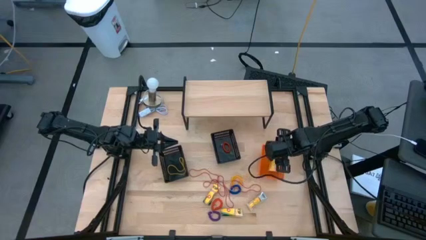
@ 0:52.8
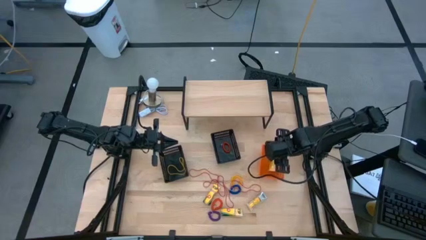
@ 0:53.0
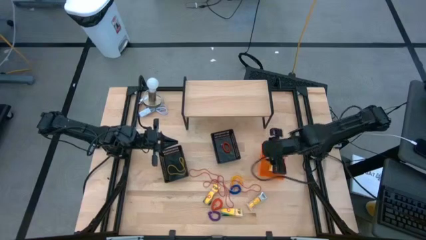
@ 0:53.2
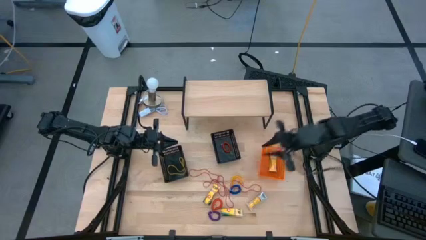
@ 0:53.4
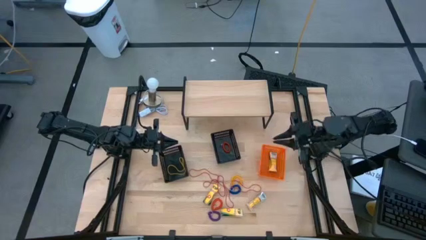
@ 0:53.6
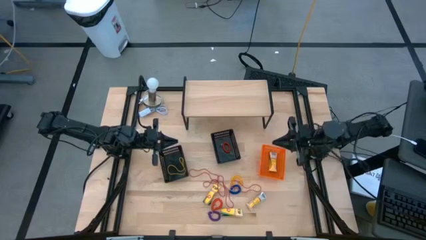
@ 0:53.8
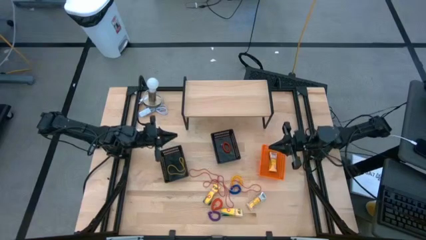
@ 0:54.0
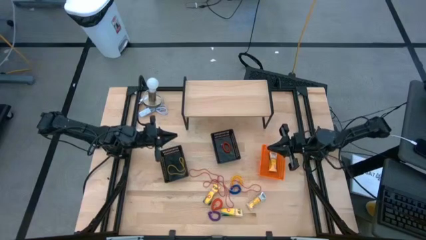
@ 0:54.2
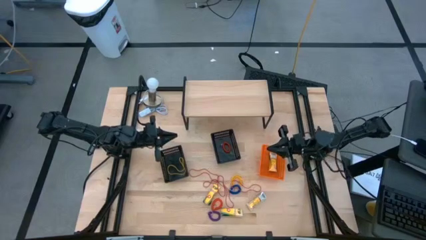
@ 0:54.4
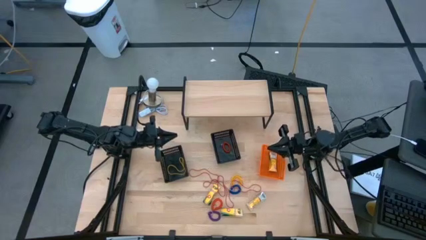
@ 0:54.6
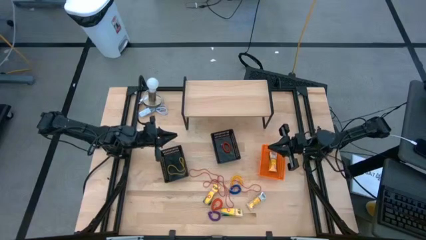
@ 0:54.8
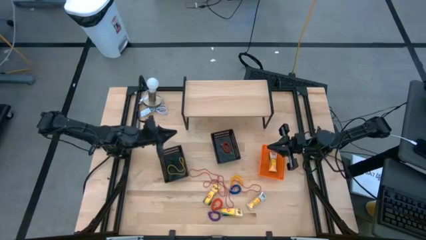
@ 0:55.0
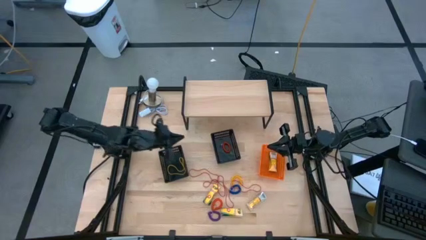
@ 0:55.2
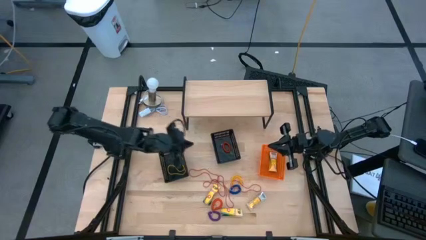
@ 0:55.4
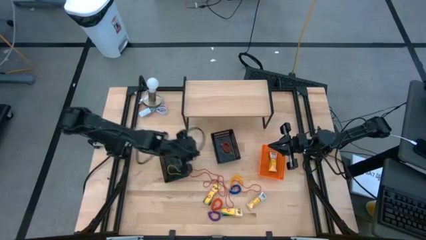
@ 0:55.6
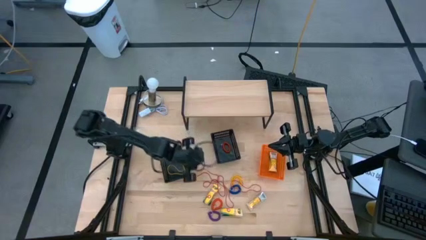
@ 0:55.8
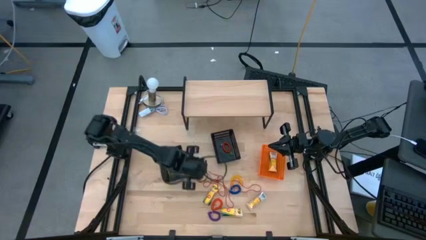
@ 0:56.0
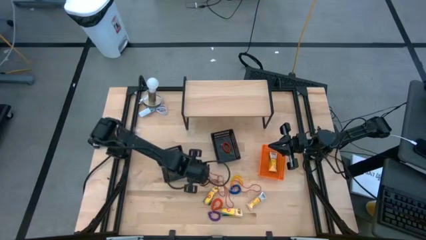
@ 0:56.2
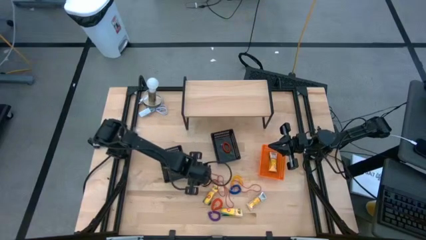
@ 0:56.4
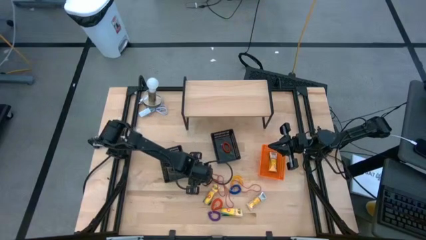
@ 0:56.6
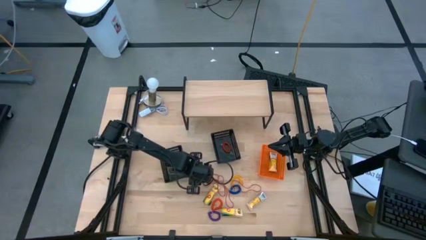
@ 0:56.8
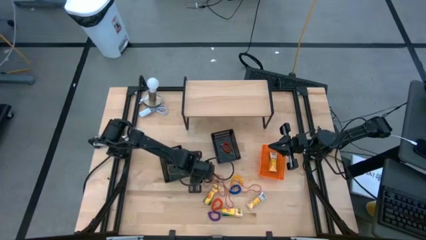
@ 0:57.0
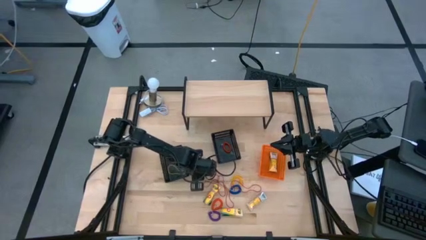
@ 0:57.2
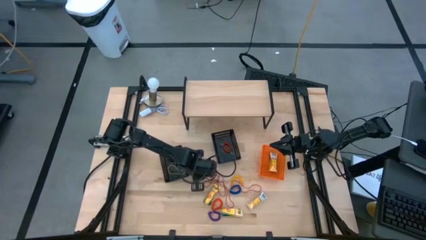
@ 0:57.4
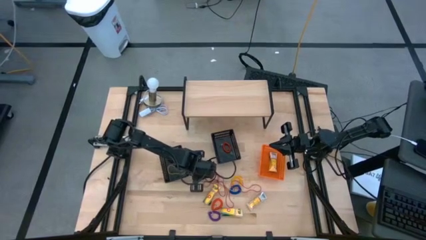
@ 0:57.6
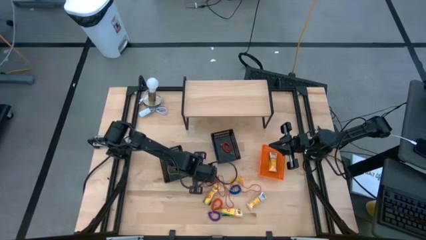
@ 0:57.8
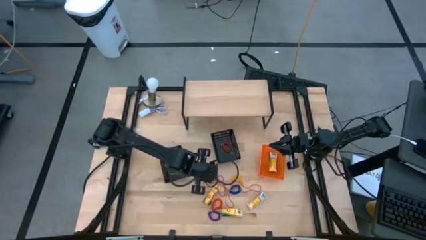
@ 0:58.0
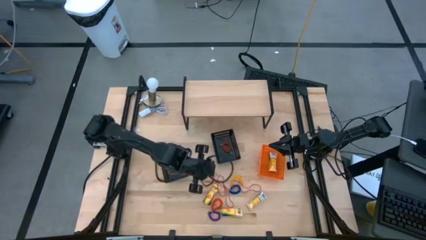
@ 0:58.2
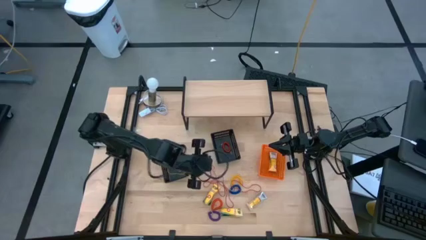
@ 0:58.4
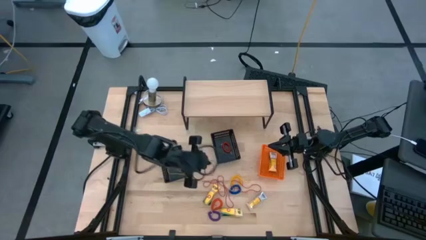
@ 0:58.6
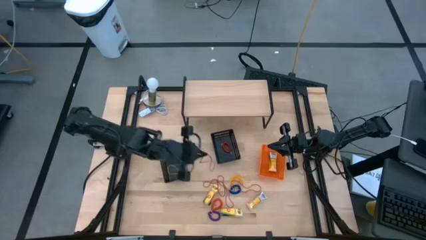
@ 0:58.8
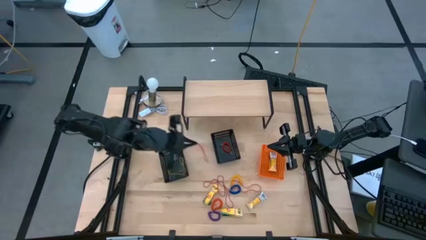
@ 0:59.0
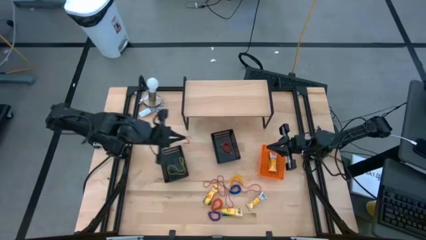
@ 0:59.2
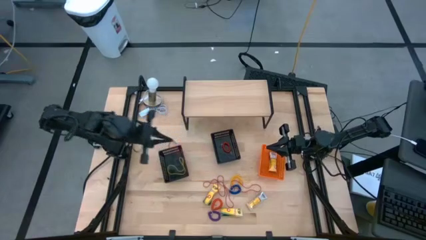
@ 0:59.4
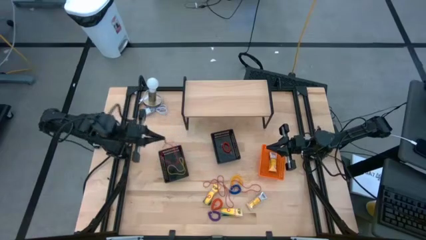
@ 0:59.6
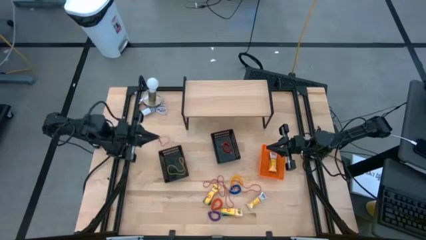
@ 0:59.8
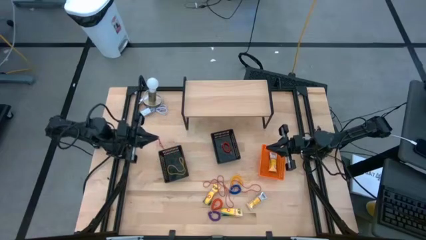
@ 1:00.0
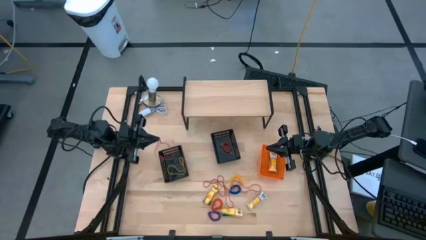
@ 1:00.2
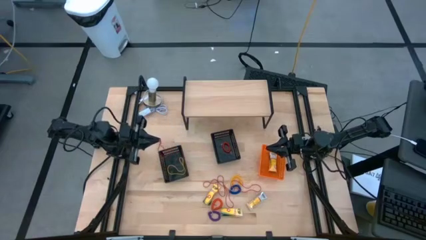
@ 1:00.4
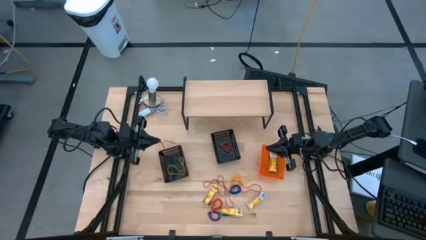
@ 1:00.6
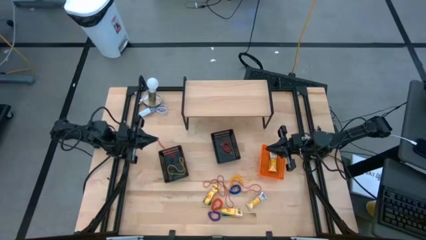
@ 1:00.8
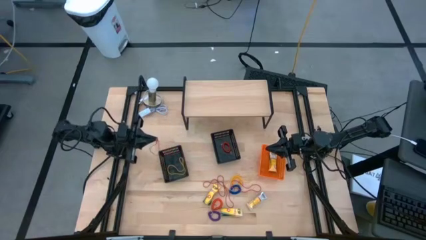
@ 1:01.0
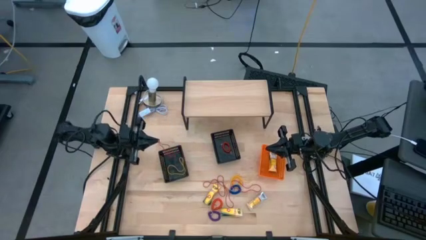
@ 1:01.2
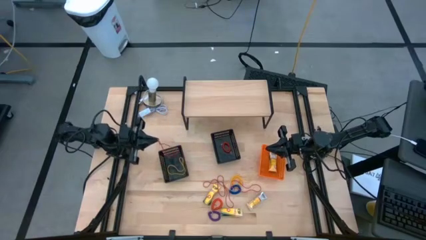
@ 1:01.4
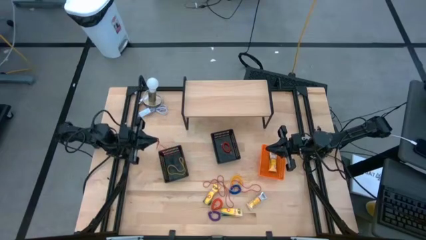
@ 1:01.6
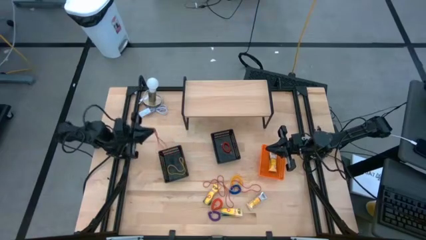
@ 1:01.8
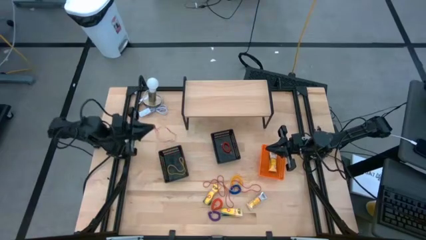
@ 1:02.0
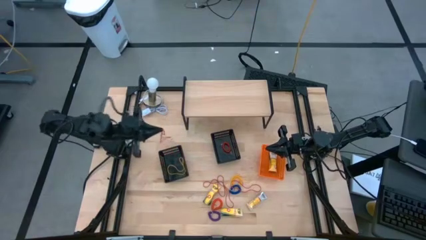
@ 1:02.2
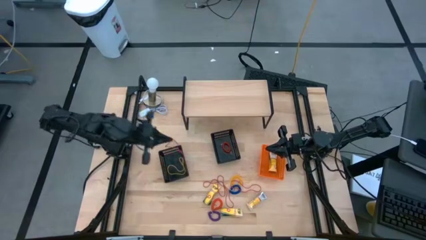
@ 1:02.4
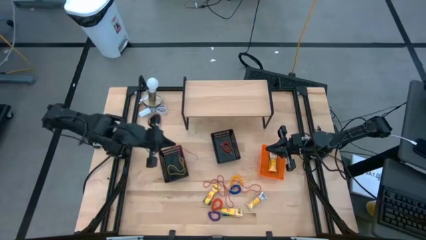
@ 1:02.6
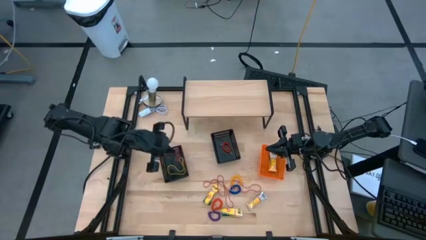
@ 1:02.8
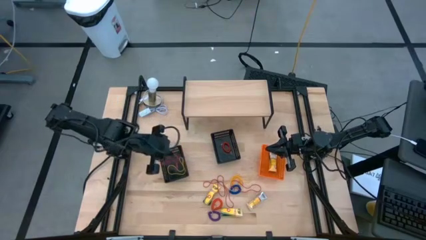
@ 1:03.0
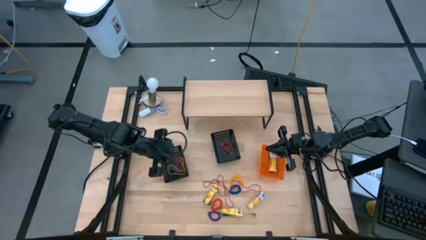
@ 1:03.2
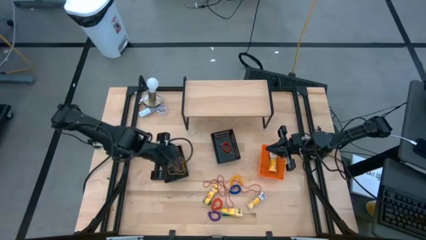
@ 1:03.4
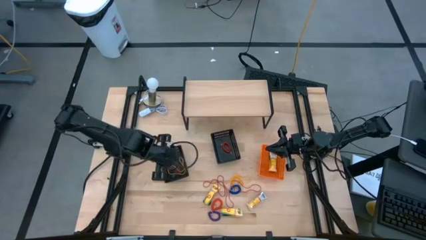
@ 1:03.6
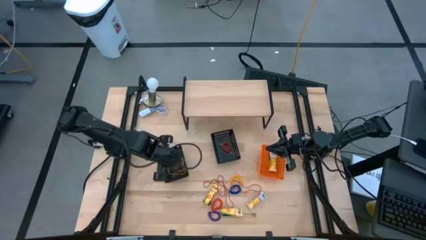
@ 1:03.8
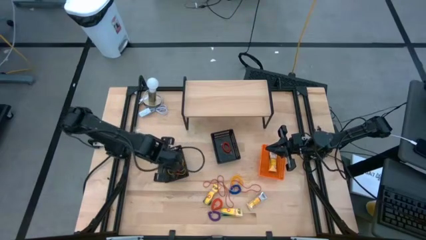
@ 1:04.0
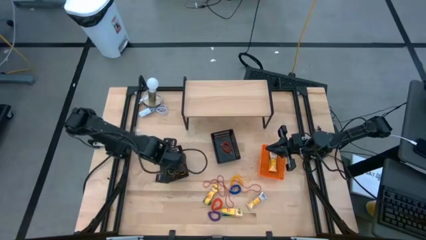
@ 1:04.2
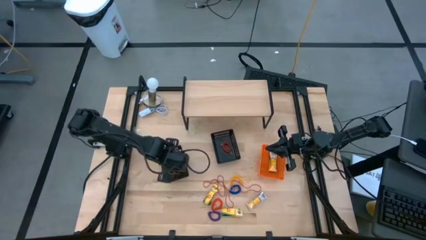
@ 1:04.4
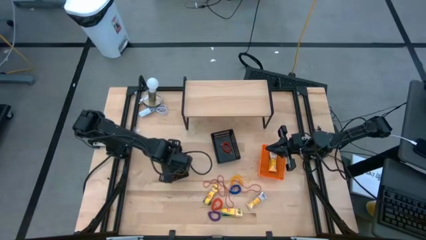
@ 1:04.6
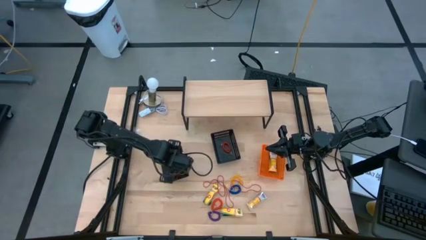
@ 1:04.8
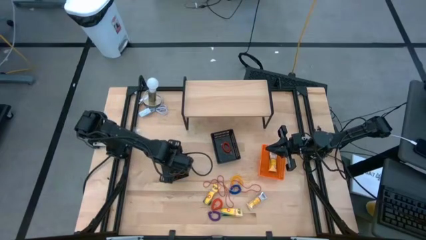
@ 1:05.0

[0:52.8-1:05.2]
Task: Pick & Place Office Desk Supplies
Put the red rubber band into the left black bin

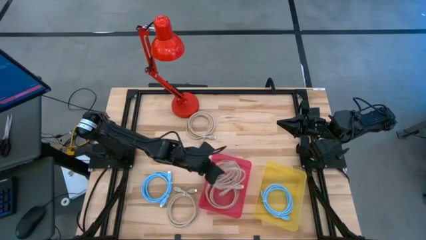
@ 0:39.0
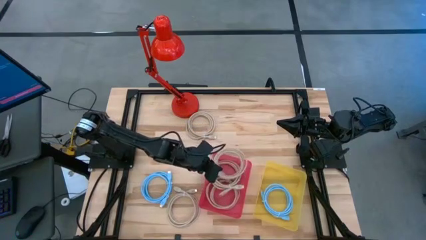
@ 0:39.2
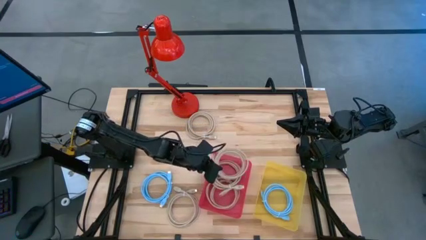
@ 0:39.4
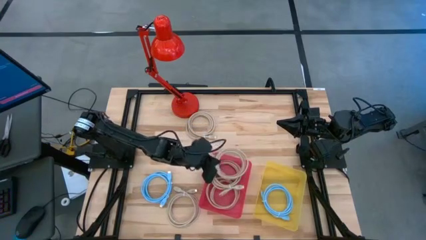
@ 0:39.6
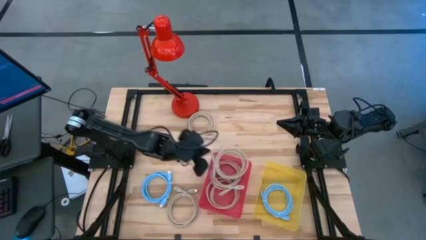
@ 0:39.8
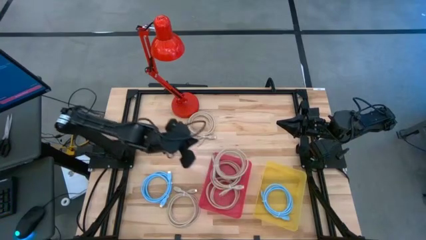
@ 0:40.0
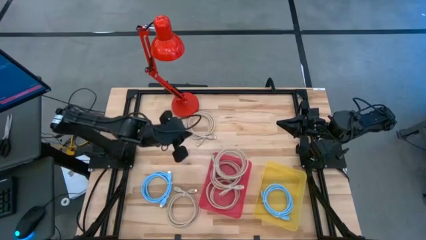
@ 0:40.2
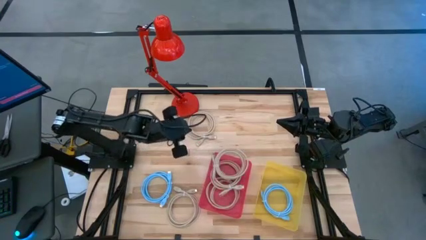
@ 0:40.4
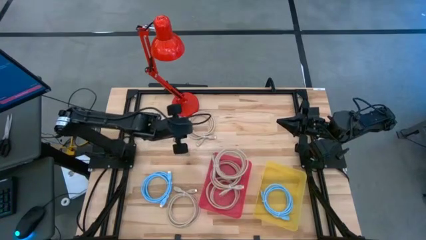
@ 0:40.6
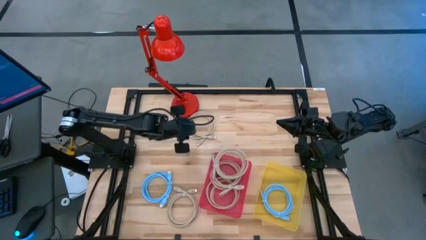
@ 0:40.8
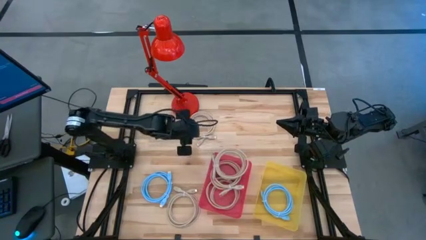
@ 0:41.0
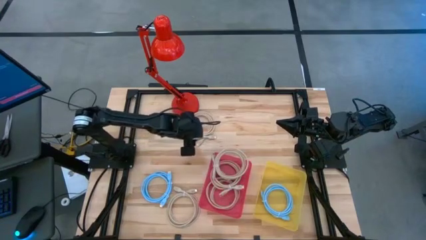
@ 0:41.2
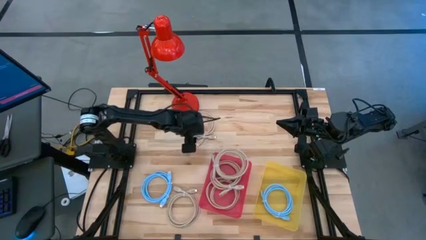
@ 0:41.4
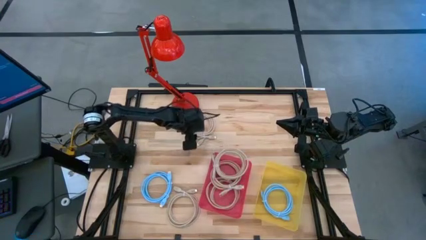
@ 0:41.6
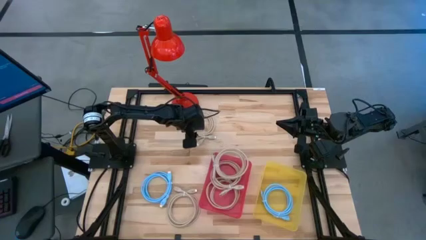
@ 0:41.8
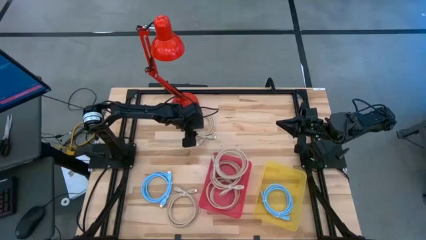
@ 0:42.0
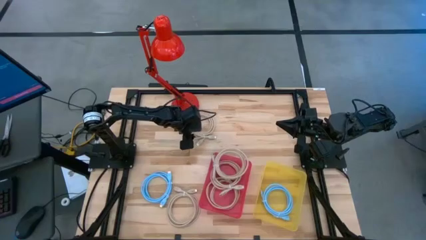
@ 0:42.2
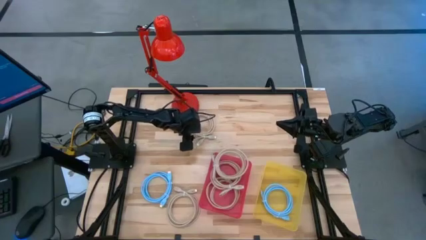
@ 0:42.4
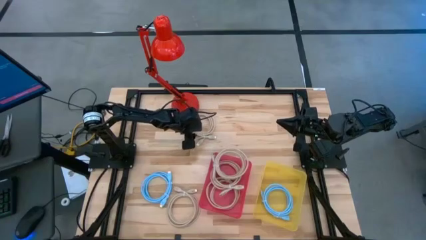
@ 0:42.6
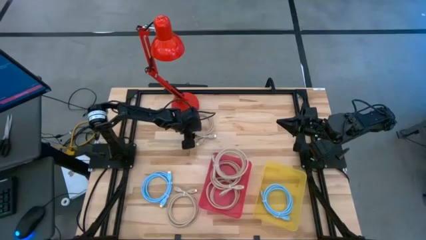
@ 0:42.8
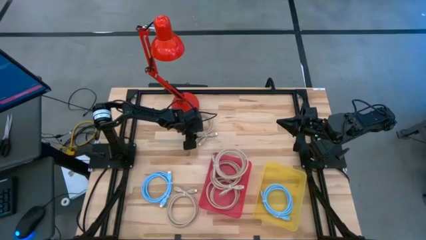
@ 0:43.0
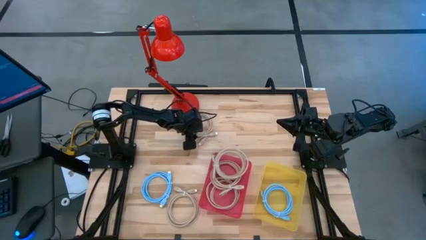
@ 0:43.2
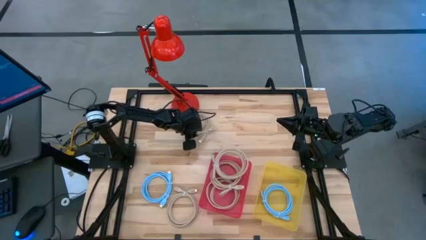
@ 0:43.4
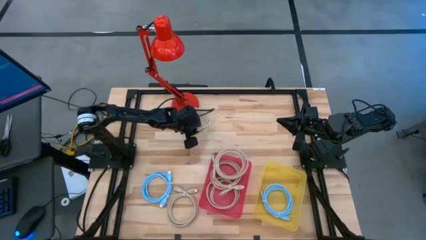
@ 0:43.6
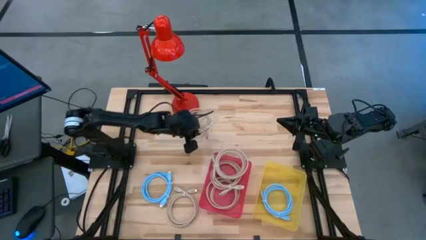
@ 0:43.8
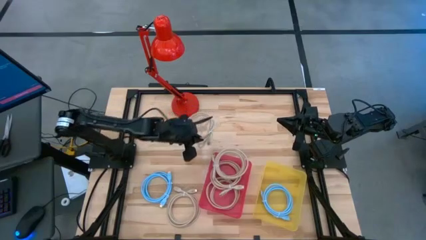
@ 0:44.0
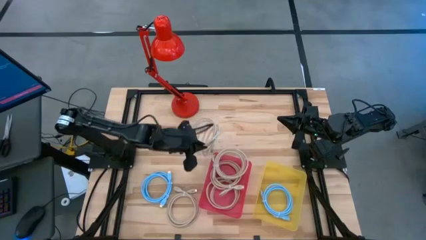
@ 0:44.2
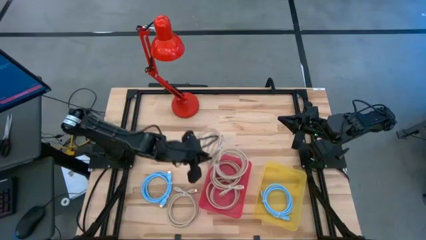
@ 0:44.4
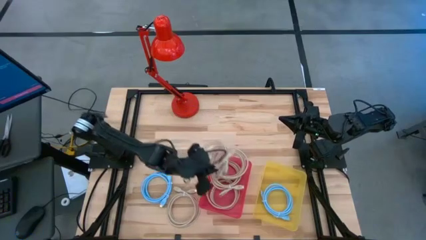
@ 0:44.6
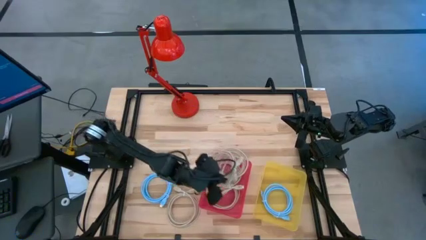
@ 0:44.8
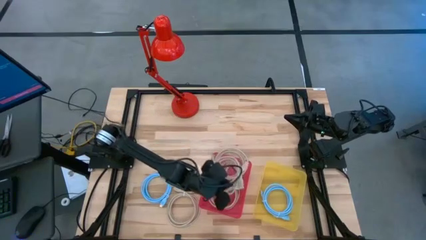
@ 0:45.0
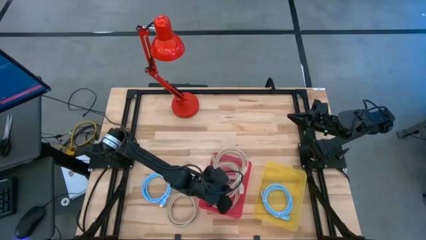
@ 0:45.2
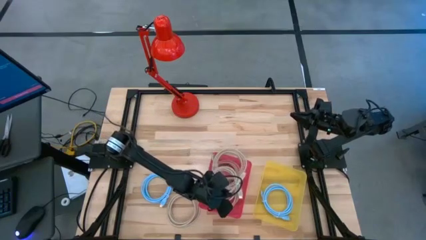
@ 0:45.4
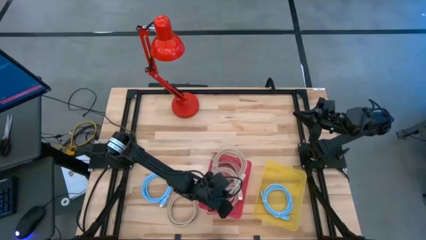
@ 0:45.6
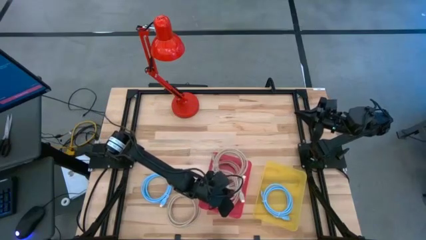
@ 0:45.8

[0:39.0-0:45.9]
Task: Sort HDMI cables
Put the brown HDMI cable into the pink bin
